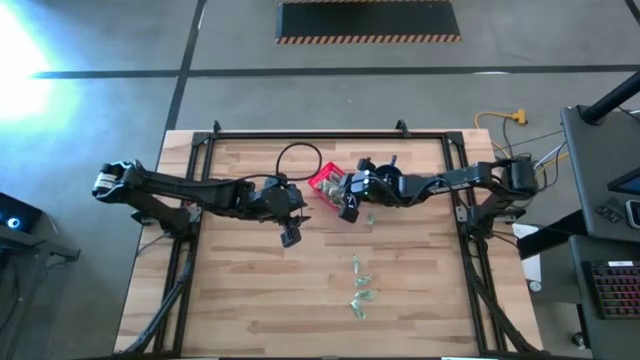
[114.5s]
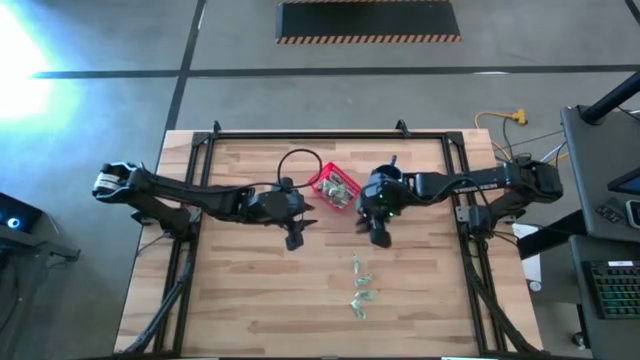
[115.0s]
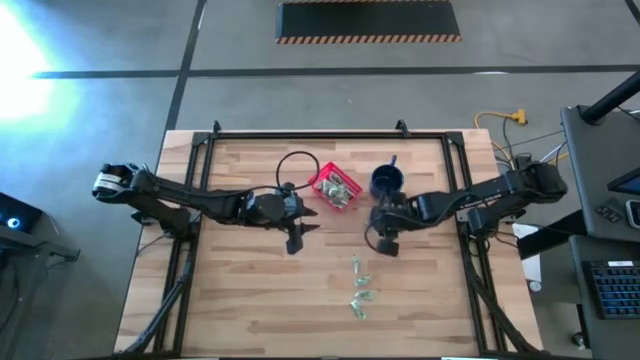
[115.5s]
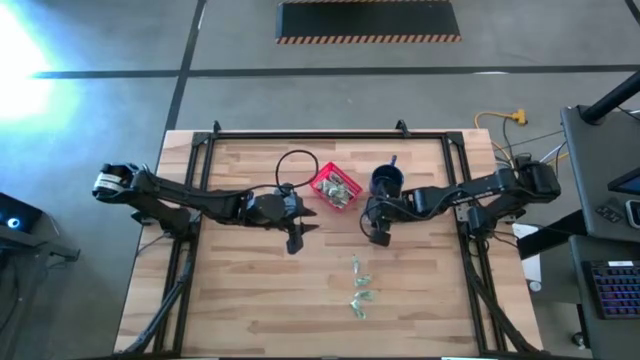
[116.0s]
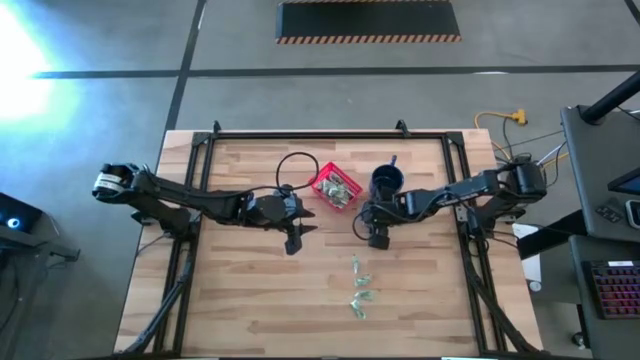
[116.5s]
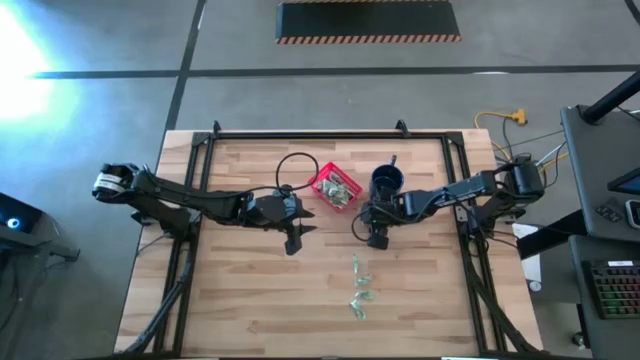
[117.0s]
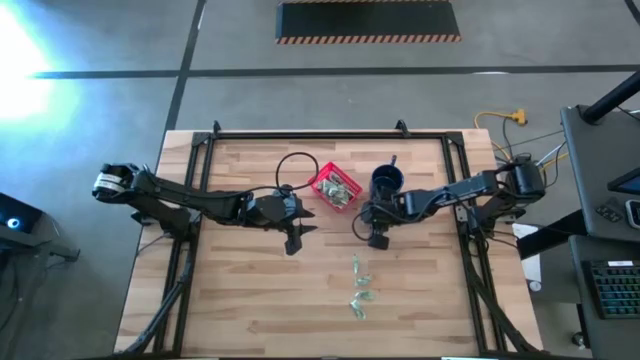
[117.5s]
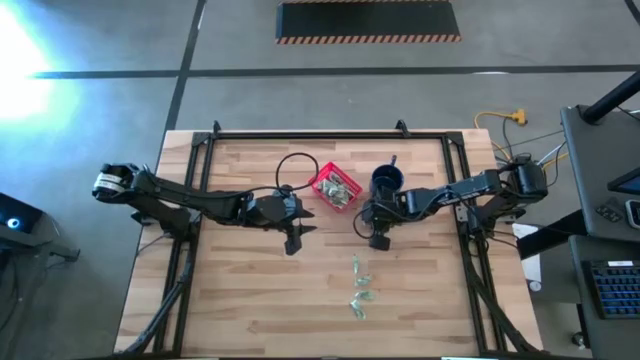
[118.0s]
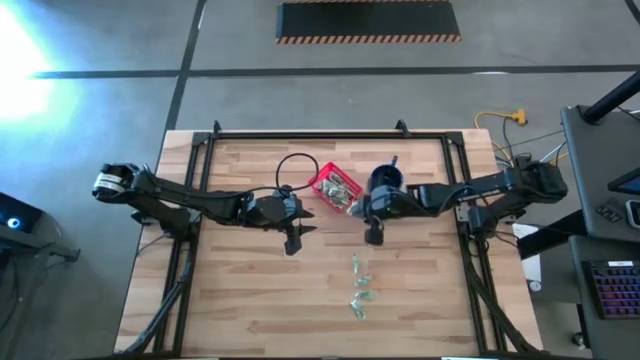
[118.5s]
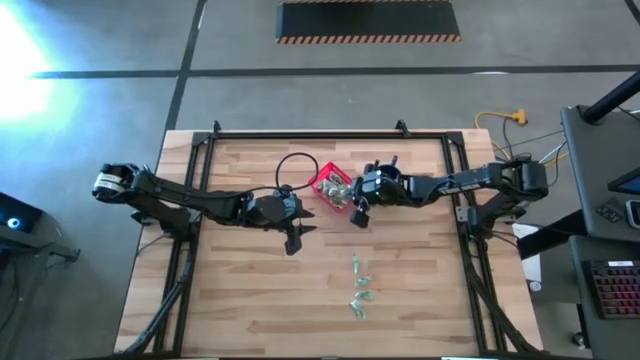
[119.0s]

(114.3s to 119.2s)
Task: Pick and place Stevia / Truvia into bins
Put the stevia packet into the red basket

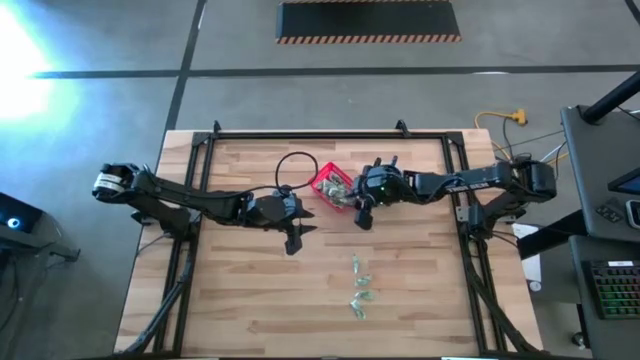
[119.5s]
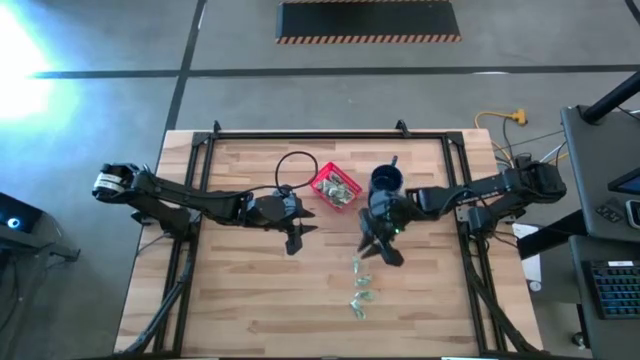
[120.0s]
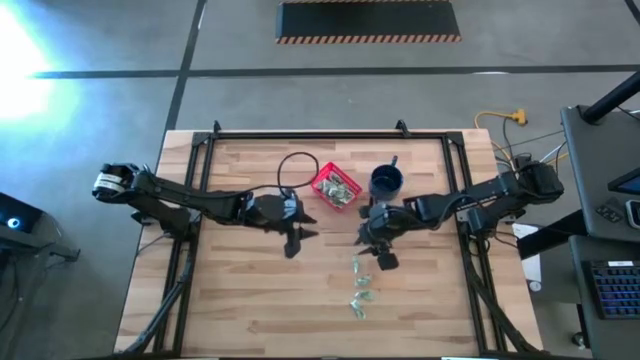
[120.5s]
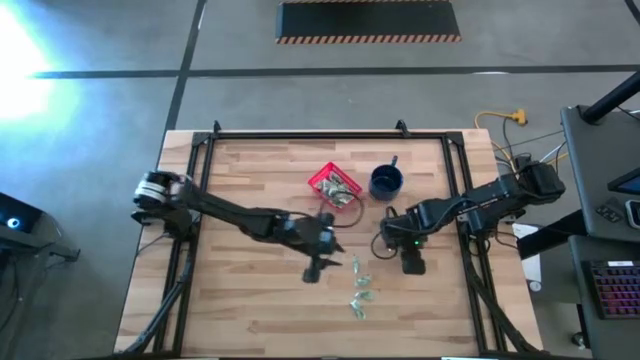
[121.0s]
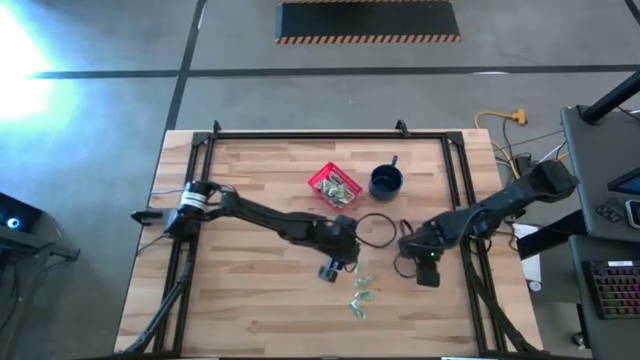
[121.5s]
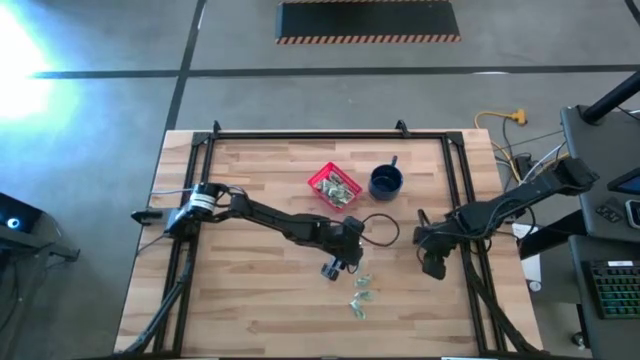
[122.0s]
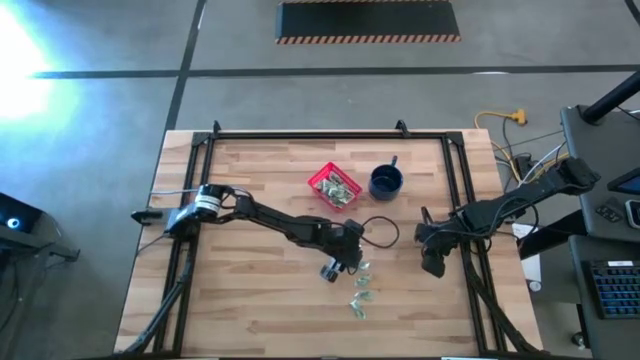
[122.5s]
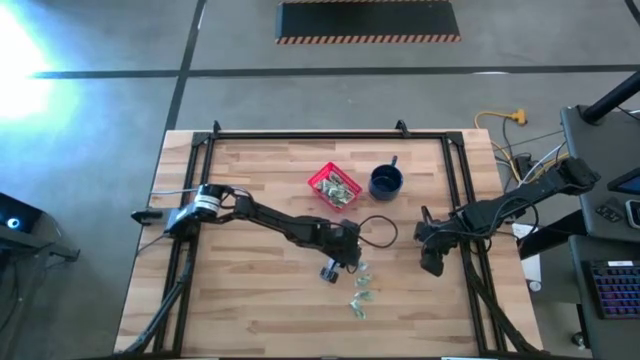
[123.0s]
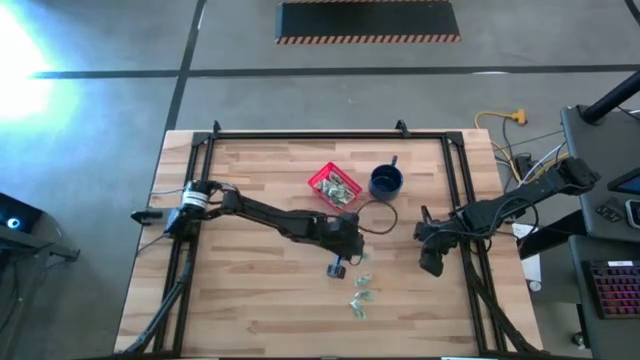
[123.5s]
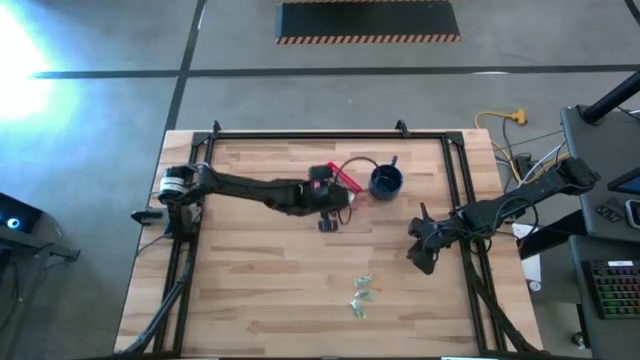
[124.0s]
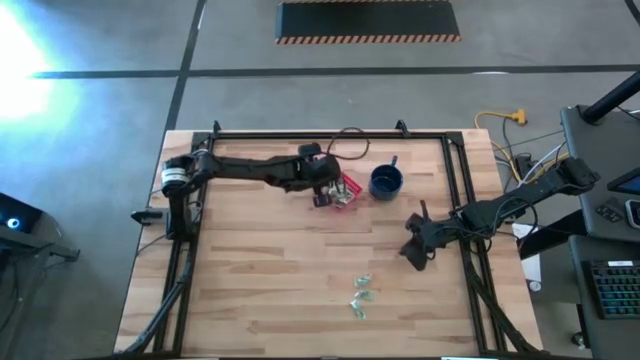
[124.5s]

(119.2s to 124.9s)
Put the stevia packet into the red basket

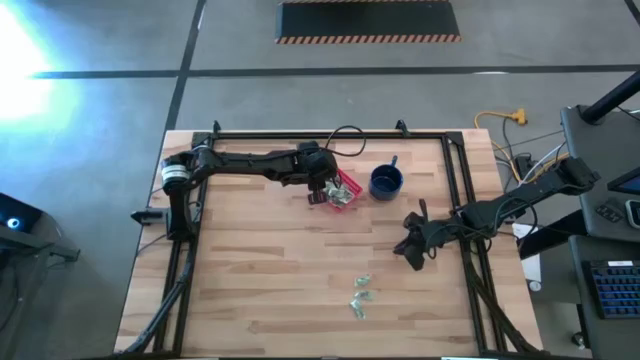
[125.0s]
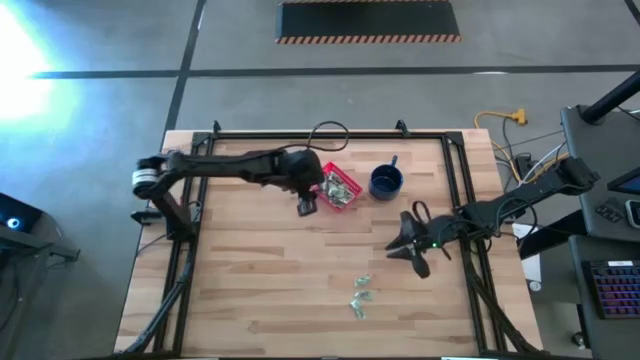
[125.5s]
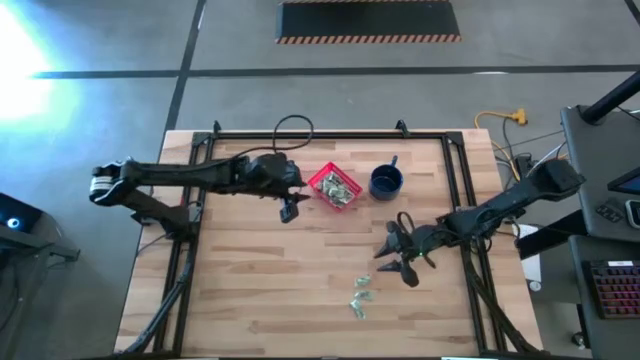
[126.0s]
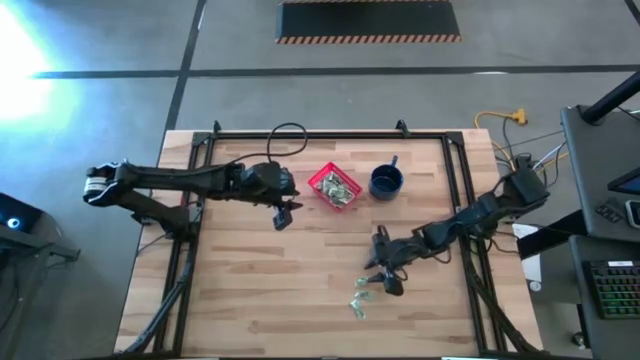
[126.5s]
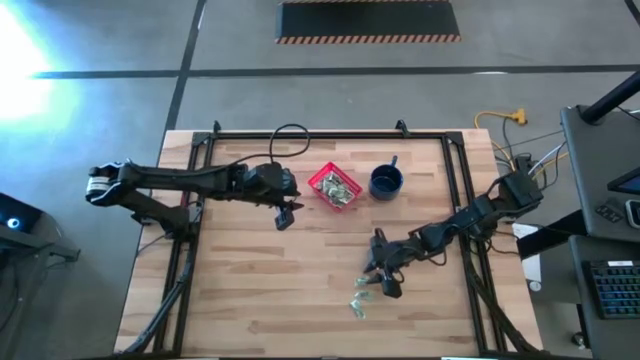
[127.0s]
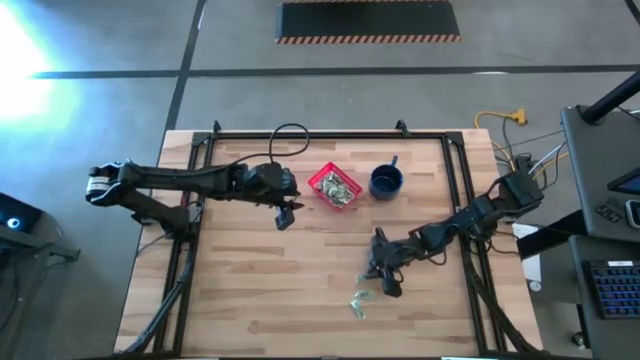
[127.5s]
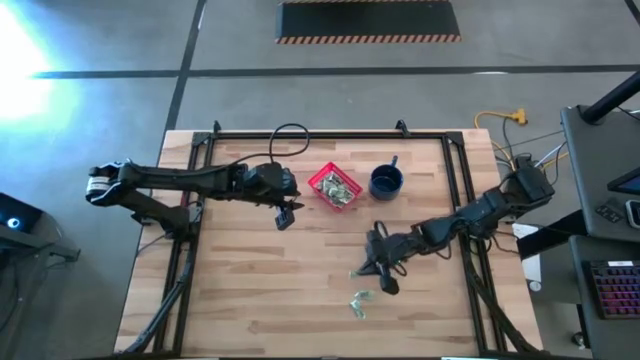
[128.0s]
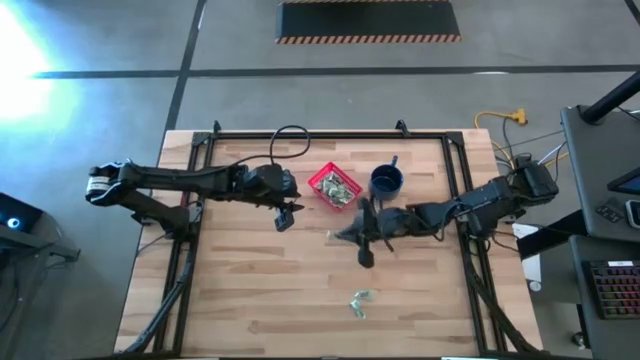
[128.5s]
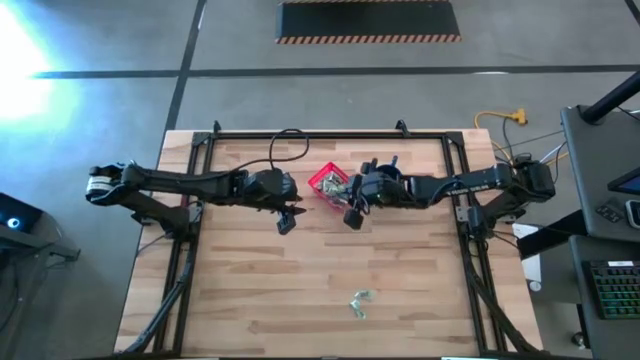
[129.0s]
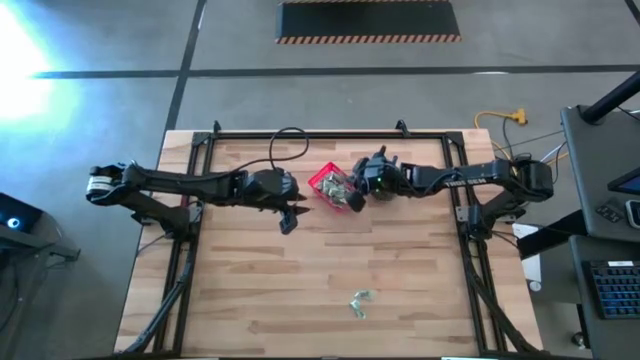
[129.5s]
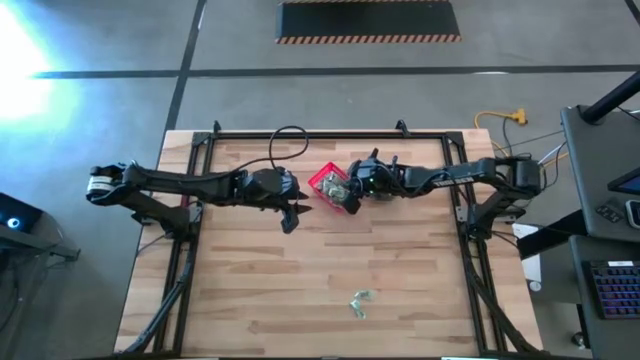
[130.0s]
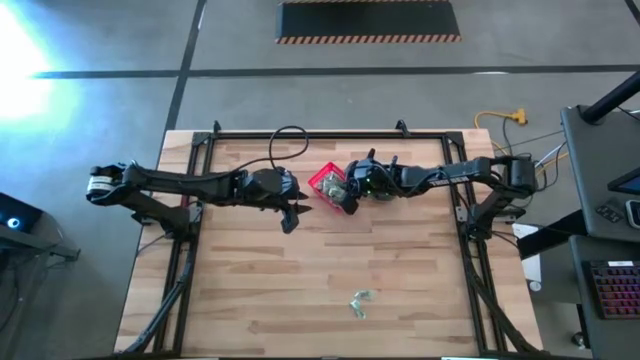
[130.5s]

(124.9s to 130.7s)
Put the stevia packet into the red basket

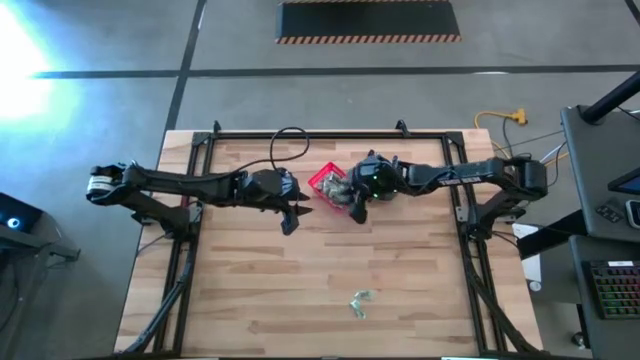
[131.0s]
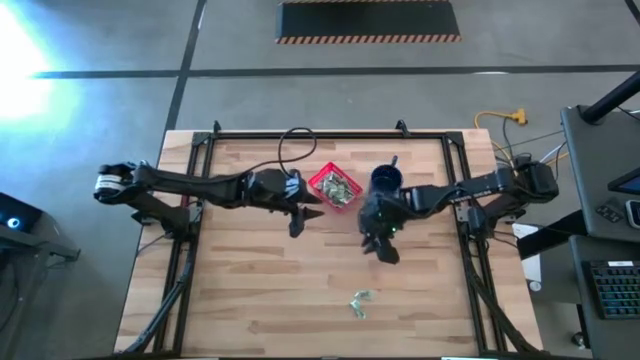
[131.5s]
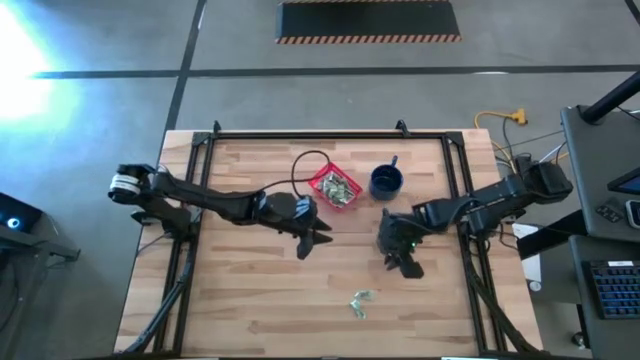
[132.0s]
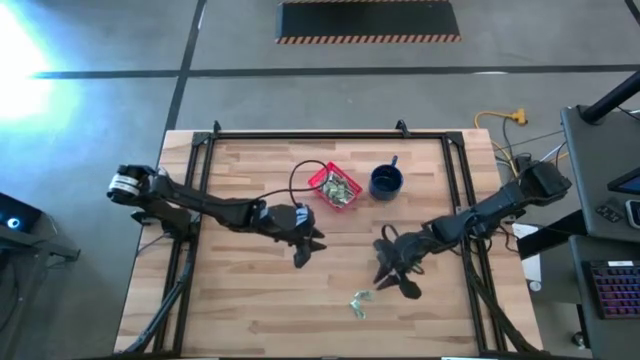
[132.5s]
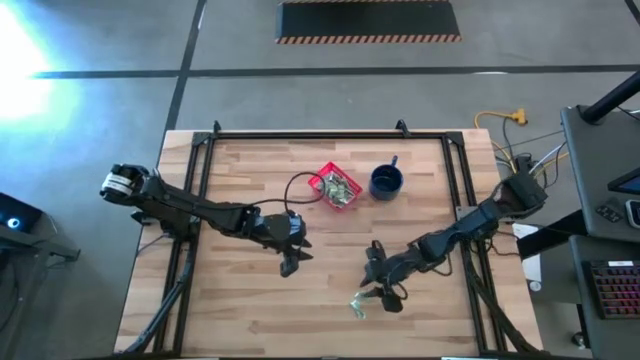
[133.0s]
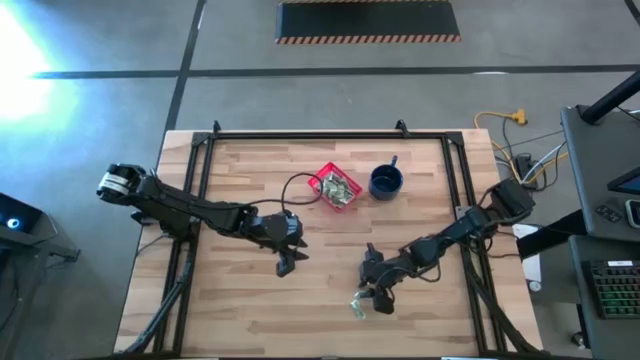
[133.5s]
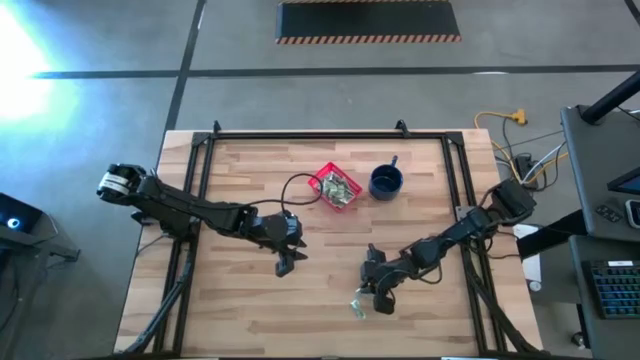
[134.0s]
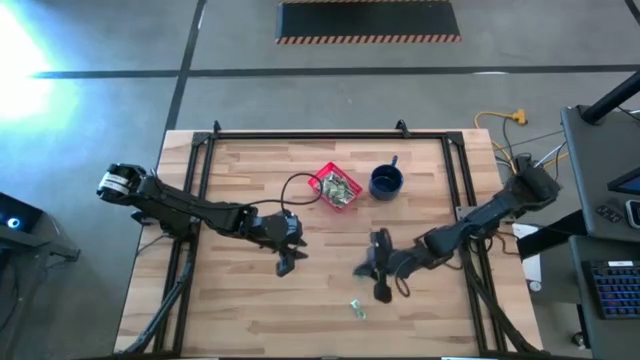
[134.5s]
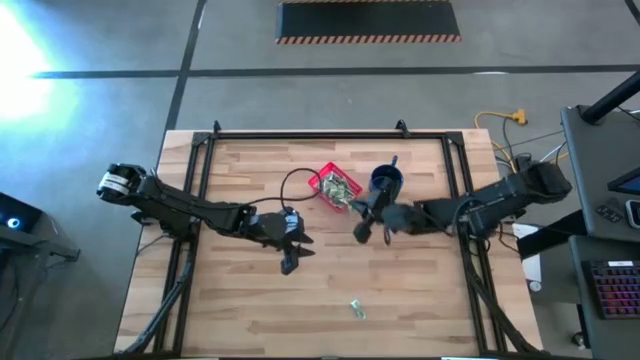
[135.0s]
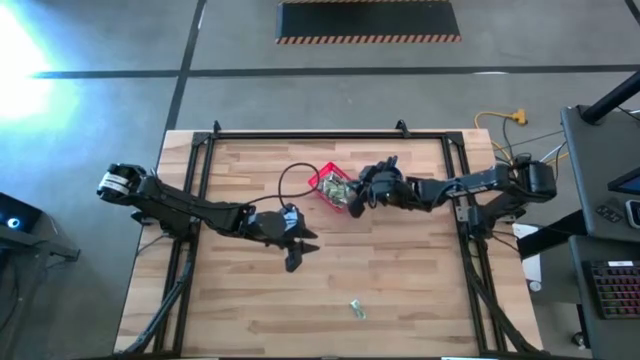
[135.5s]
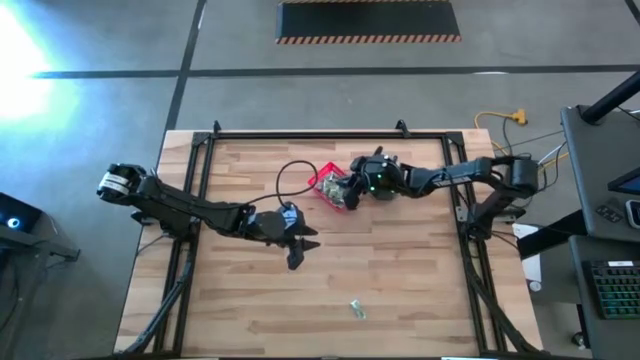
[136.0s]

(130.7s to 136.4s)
Put the stevia packet into the red basket
